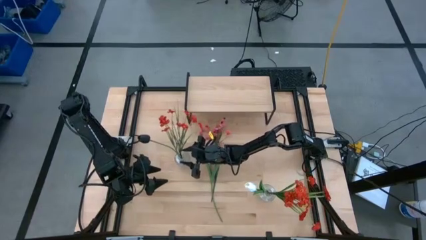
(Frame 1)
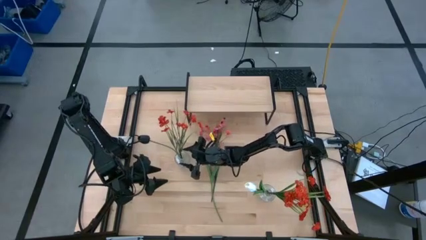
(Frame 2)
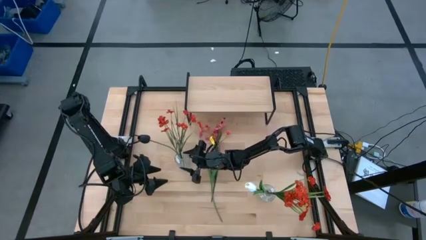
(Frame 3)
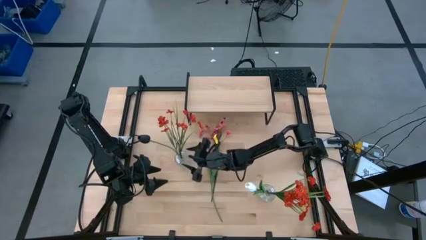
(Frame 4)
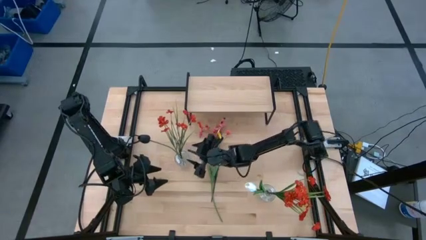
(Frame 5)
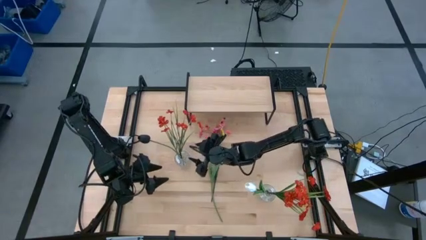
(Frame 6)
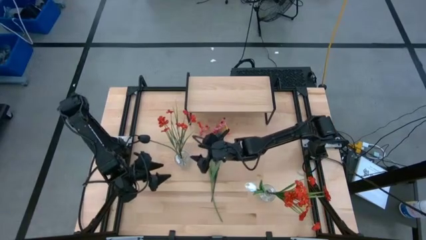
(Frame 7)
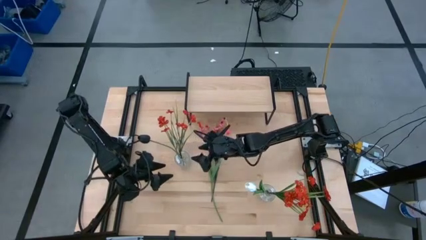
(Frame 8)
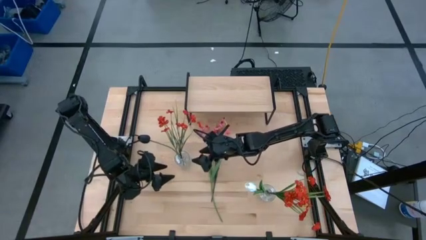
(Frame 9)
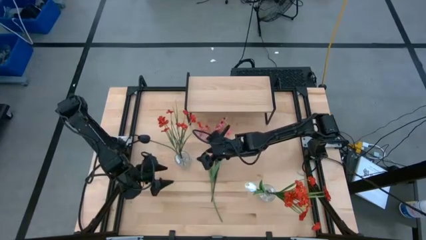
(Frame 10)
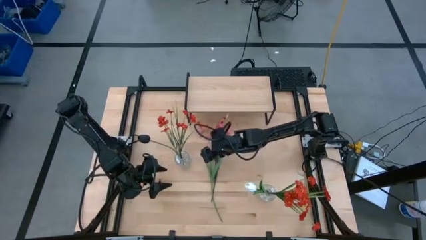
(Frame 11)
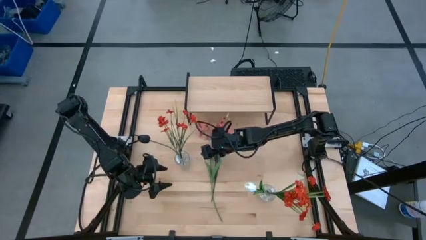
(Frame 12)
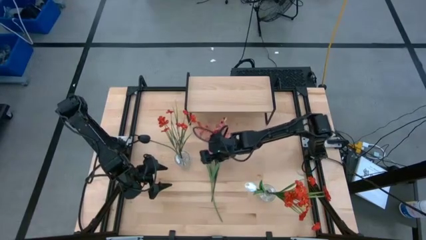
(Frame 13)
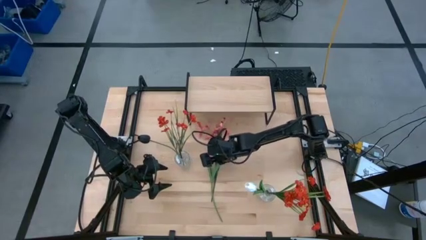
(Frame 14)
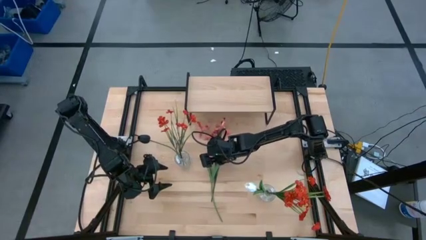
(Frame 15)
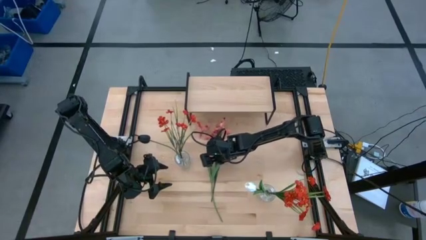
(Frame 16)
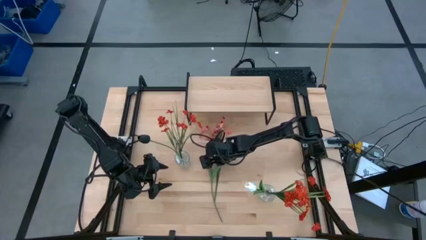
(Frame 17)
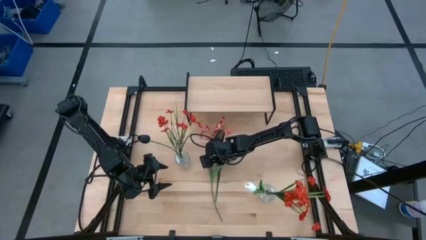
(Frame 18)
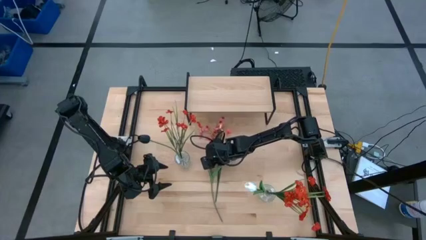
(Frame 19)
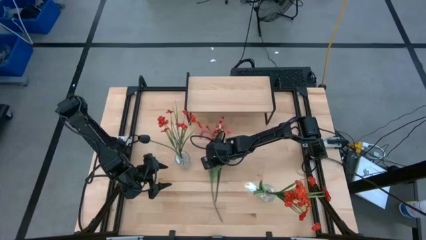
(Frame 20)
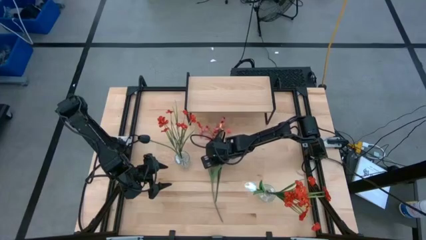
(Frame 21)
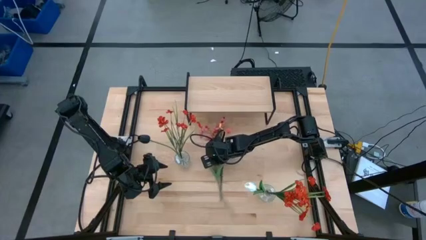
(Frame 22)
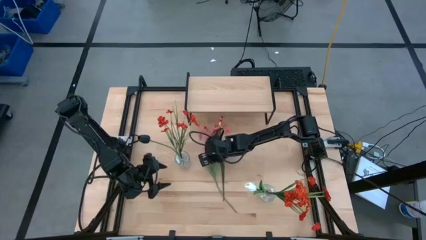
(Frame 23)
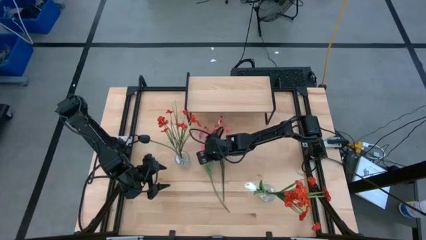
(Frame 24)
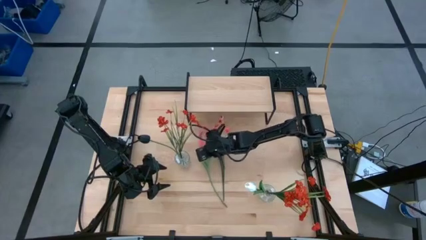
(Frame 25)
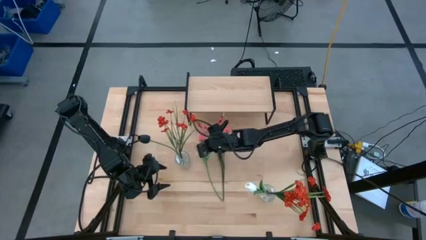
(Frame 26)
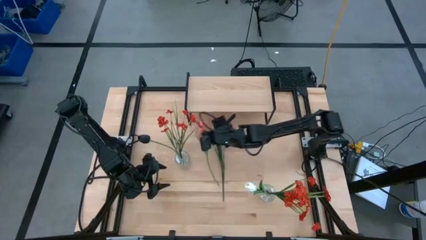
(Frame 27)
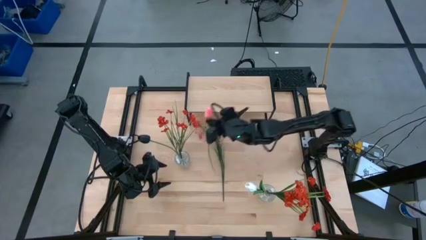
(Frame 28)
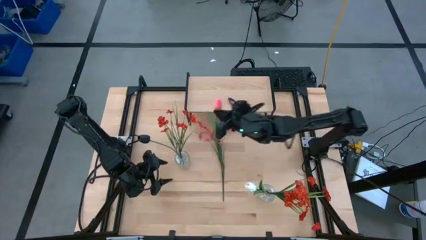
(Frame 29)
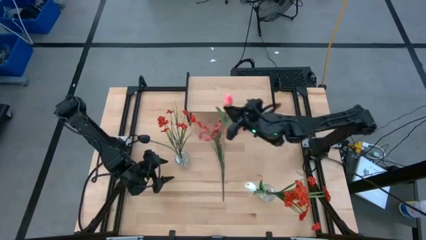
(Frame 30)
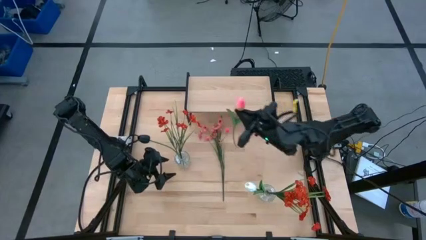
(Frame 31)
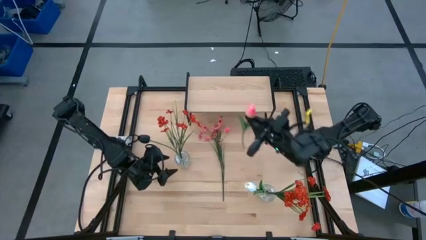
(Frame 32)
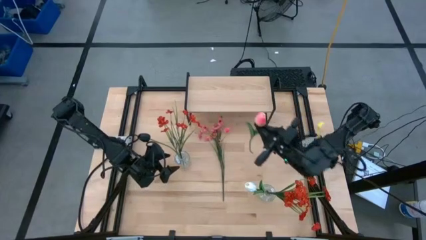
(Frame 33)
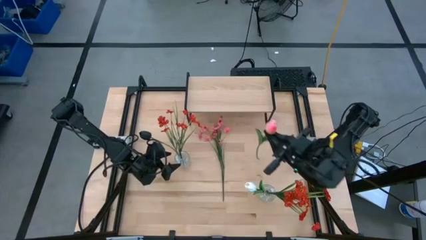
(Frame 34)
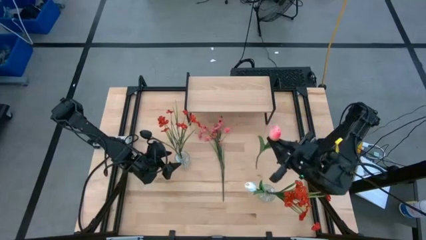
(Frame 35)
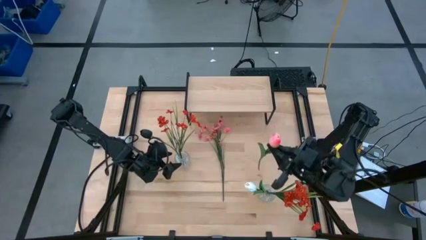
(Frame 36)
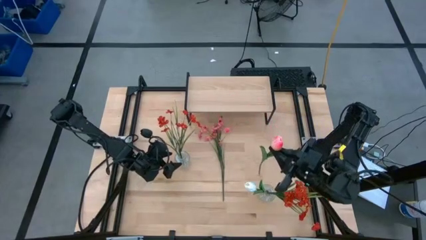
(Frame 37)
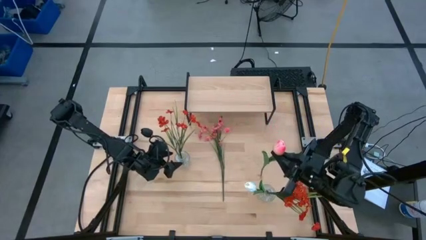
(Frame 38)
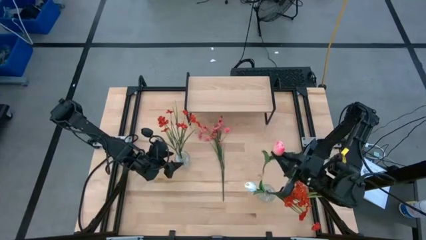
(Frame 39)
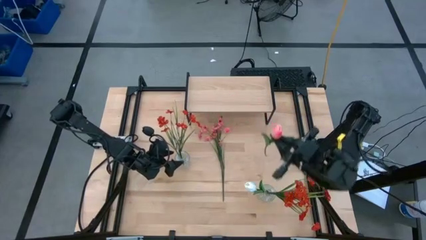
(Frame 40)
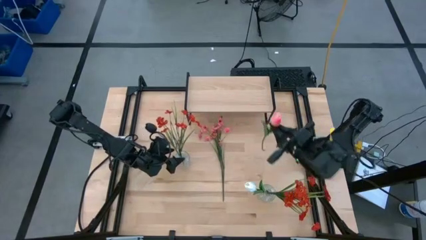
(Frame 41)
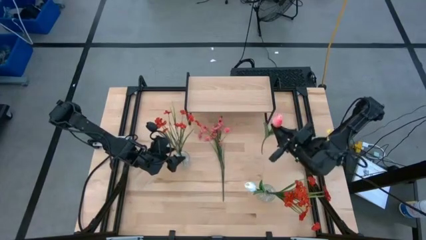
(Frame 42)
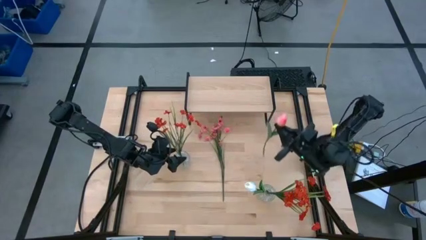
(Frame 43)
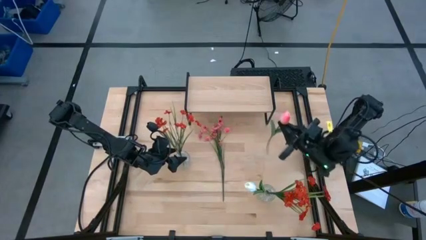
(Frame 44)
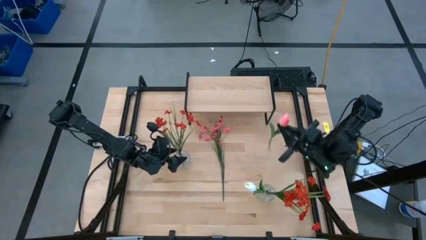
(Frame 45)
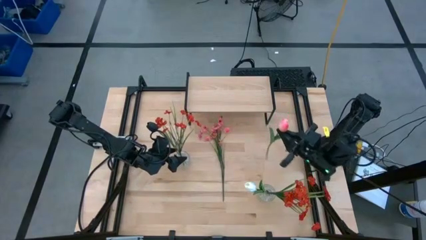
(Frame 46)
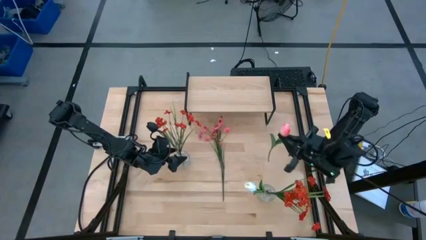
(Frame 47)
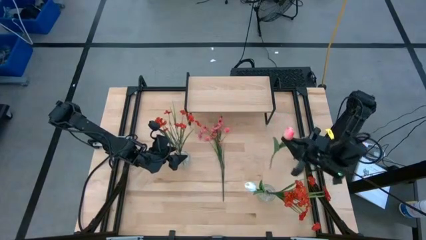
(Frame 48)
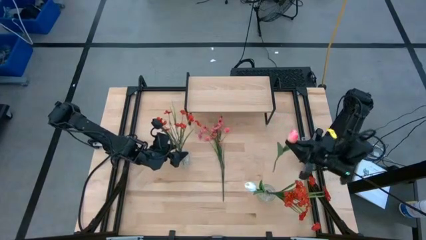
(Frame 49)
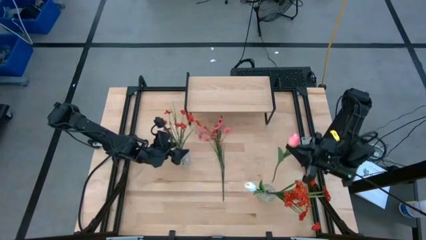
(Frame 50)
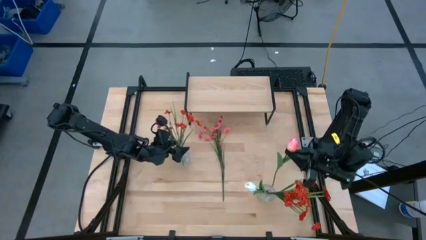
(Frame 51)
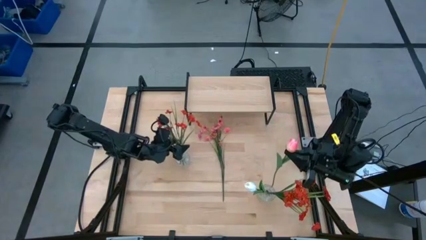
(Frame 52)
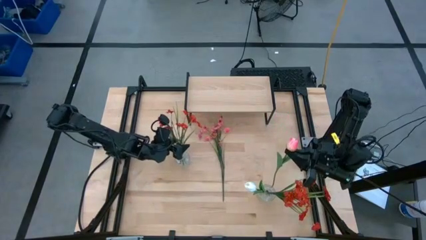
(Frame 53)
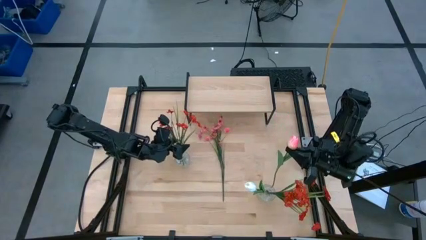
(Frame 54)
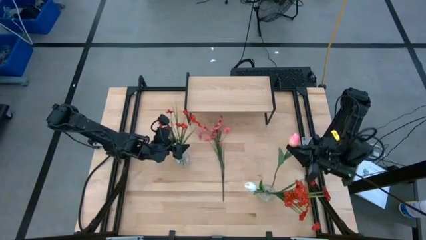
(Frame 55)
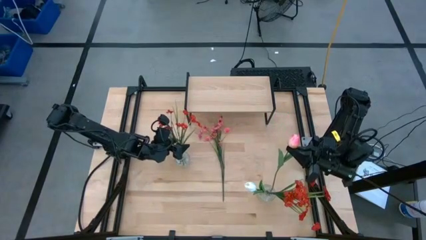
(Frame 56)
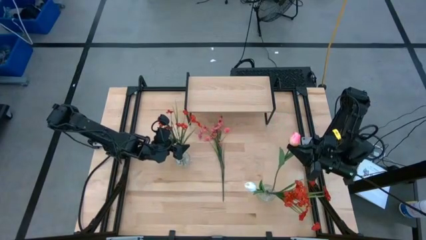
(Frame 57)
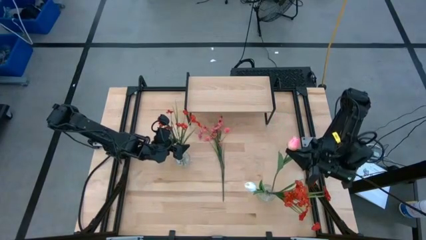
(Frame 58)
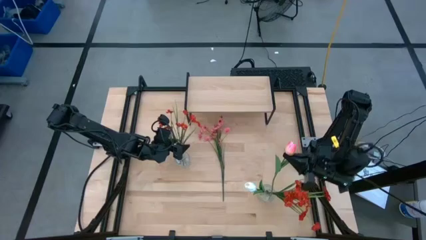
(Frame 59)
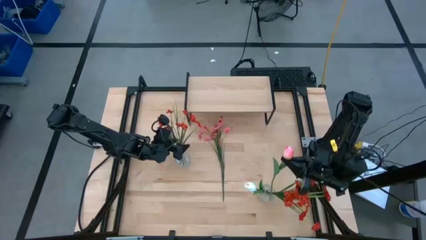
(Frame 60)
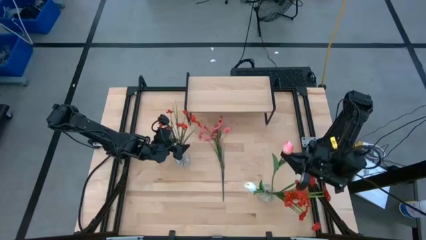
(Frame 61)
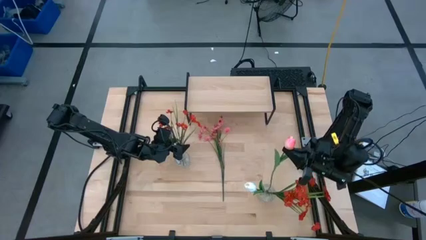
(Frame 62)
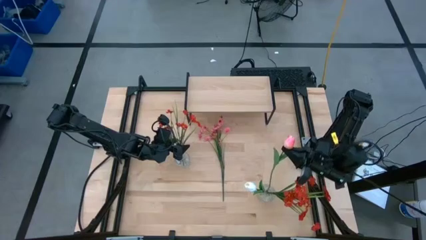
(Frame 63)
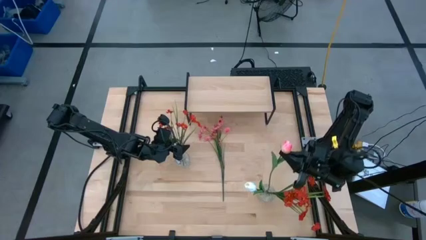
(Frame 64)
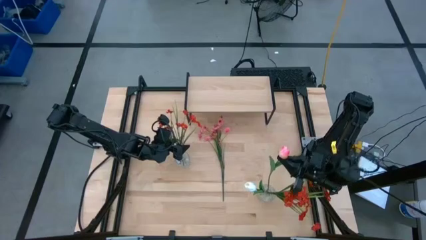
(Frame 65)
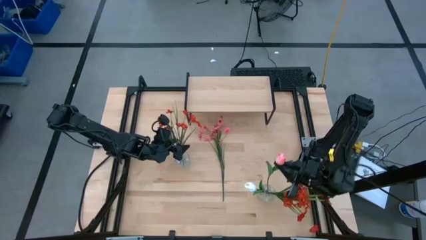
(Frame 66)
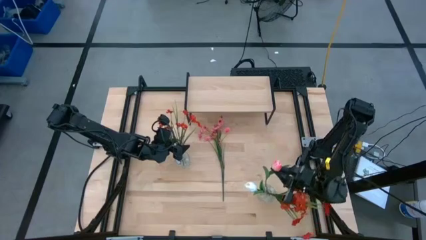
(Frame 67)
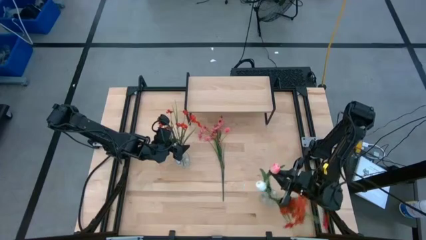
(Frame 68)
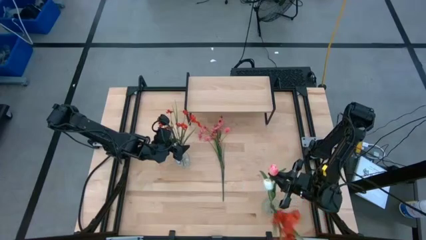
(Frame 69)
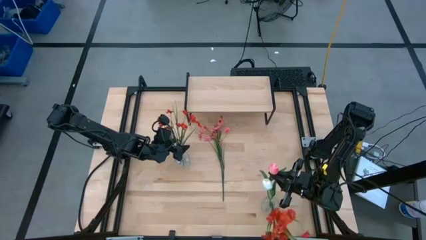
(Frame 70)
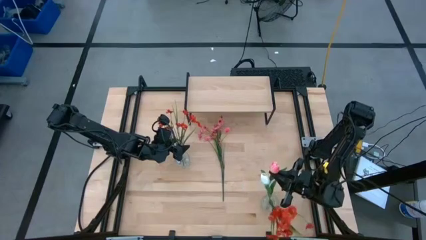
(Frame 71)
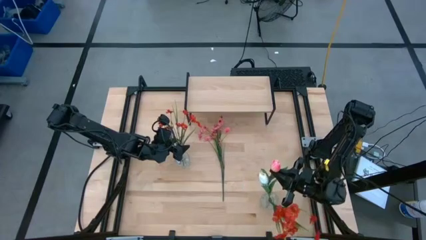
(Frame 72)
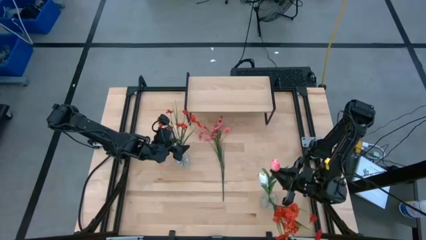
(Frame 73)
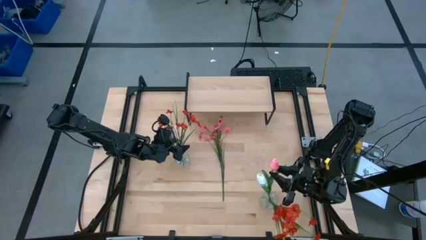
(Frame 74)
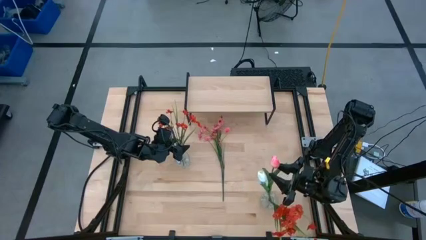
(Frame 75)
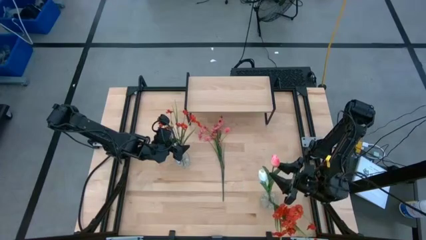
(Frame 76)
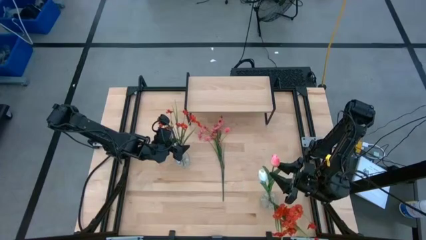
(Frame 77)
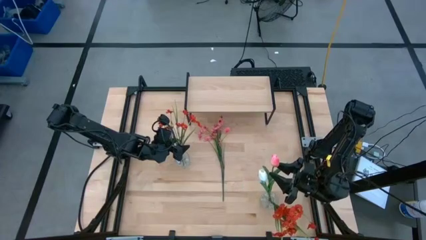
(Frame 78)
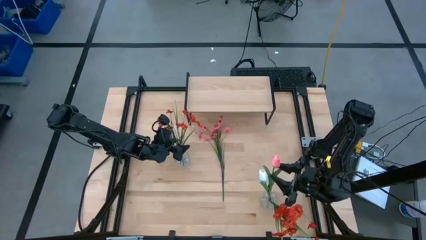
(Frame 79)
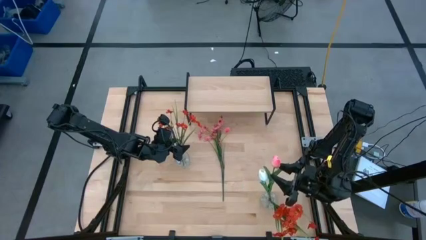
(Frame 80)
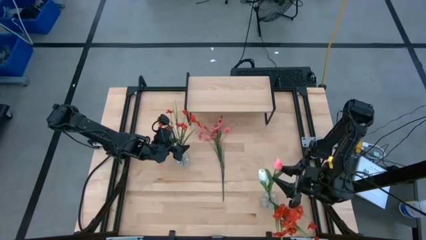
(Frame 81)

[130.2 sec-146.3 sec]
Task: Pick and place flowers into a vace then onto a shelf
Put the pink flower into the right transparent vase
